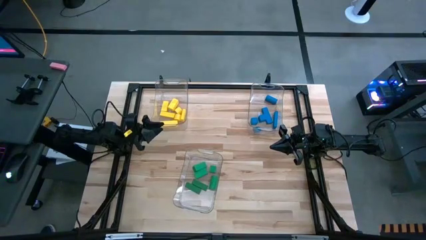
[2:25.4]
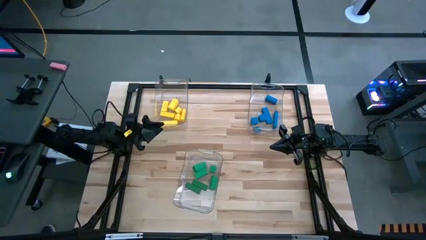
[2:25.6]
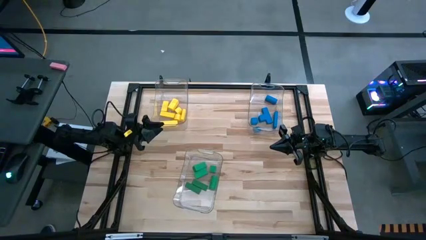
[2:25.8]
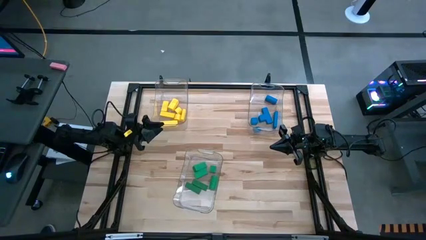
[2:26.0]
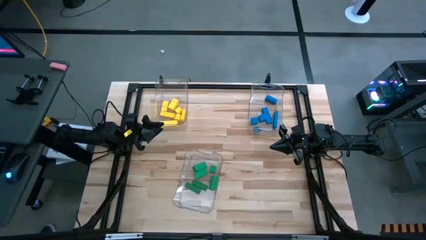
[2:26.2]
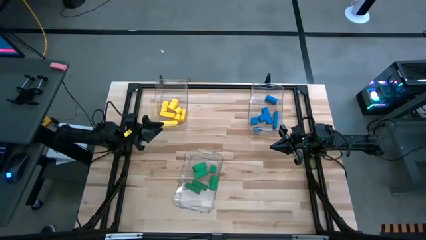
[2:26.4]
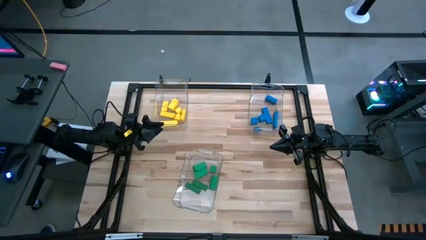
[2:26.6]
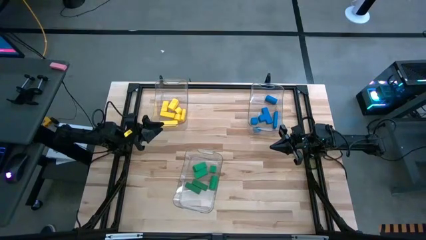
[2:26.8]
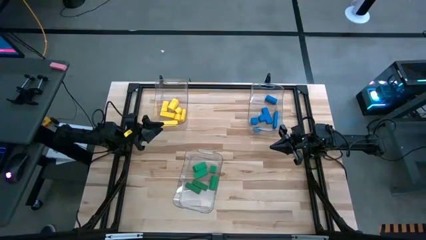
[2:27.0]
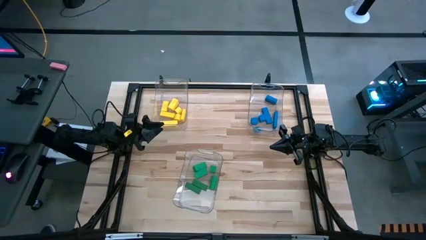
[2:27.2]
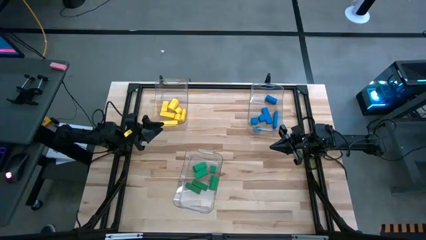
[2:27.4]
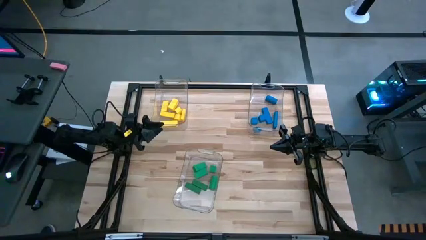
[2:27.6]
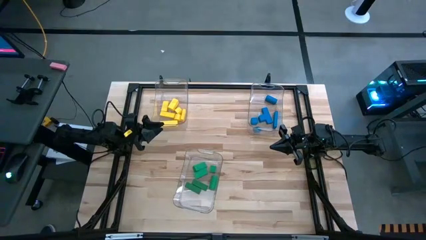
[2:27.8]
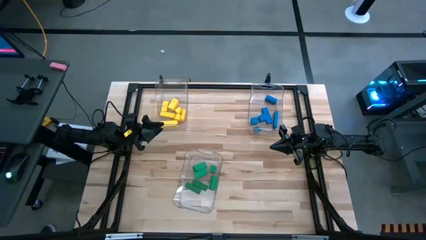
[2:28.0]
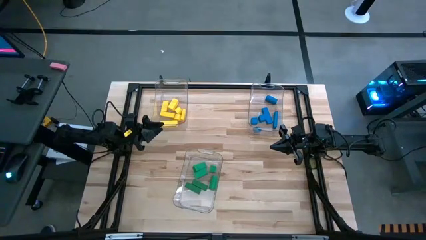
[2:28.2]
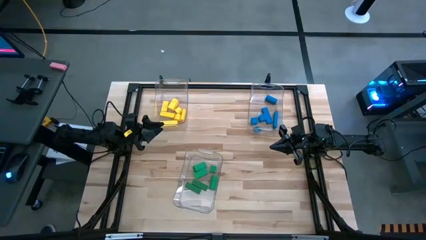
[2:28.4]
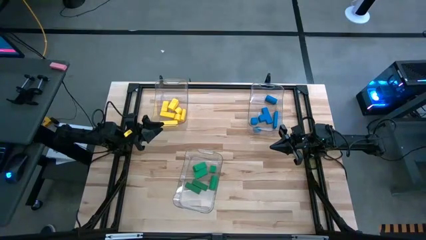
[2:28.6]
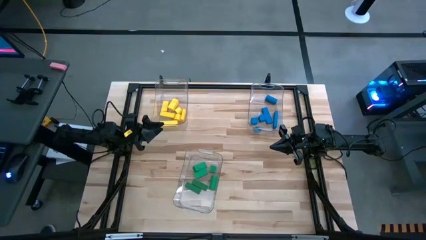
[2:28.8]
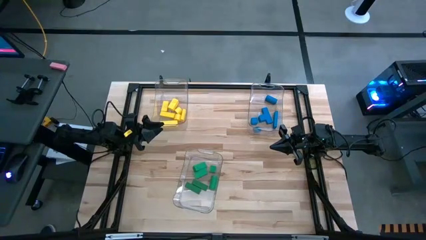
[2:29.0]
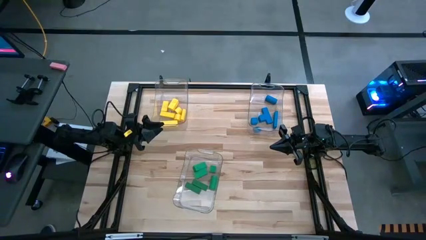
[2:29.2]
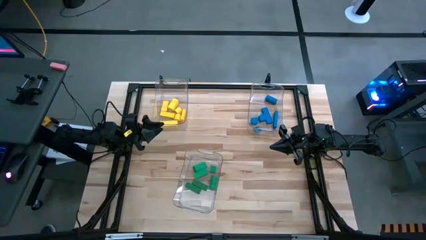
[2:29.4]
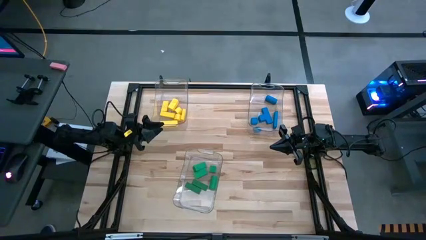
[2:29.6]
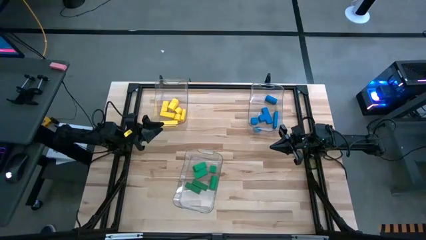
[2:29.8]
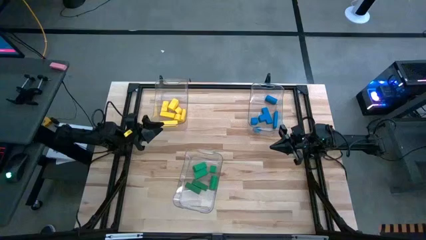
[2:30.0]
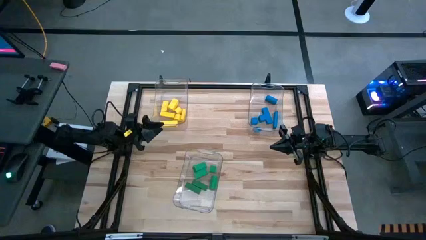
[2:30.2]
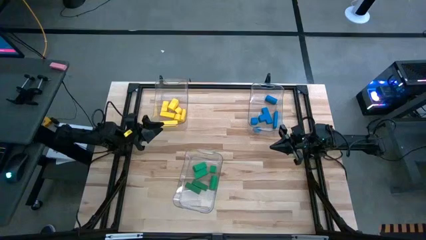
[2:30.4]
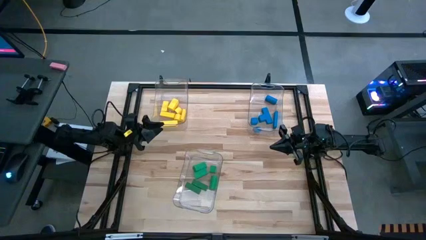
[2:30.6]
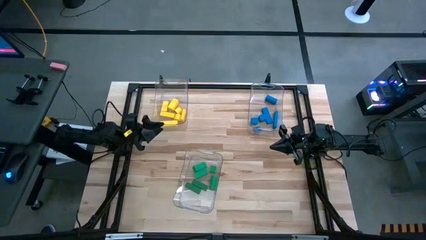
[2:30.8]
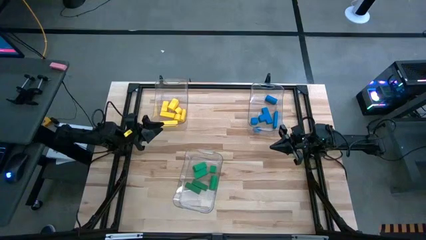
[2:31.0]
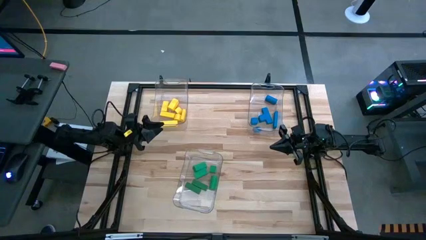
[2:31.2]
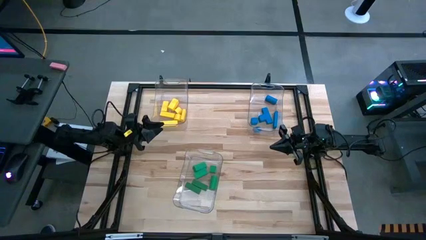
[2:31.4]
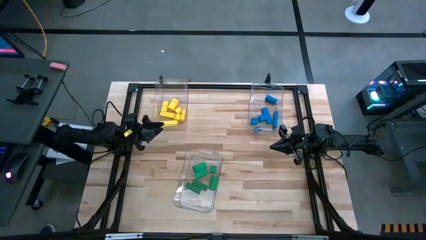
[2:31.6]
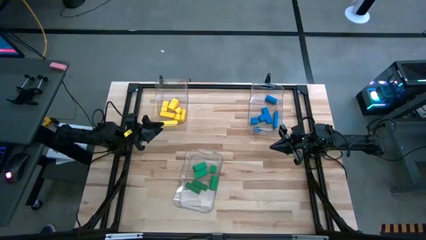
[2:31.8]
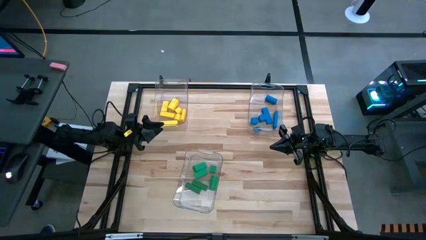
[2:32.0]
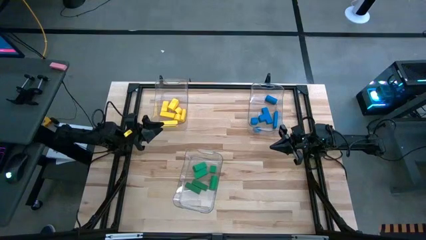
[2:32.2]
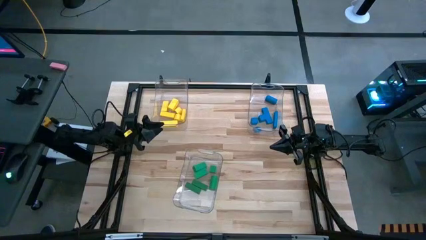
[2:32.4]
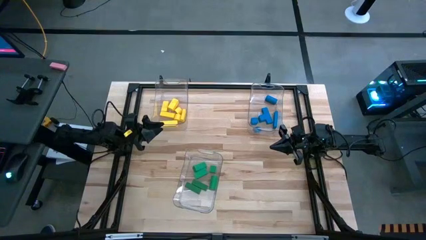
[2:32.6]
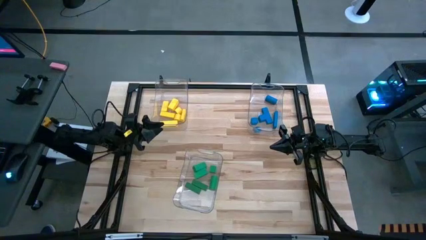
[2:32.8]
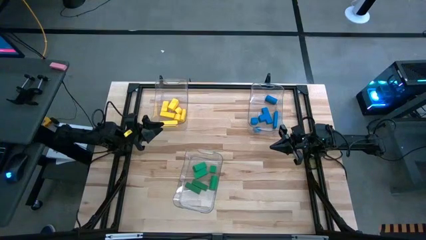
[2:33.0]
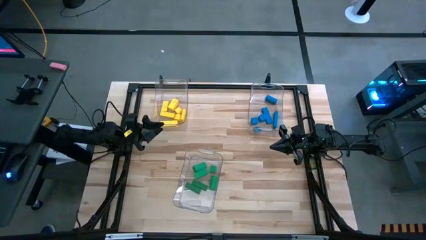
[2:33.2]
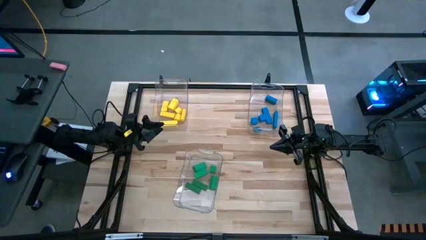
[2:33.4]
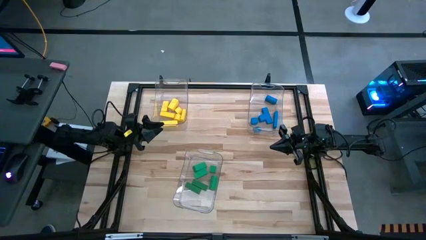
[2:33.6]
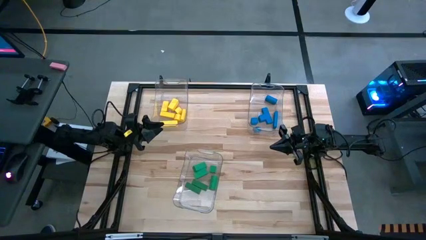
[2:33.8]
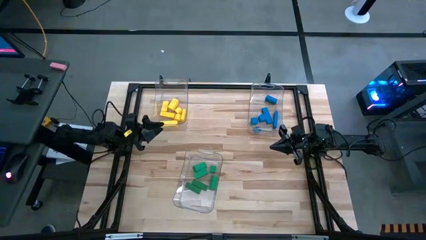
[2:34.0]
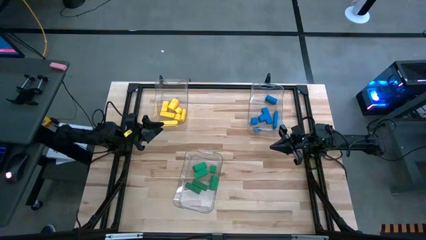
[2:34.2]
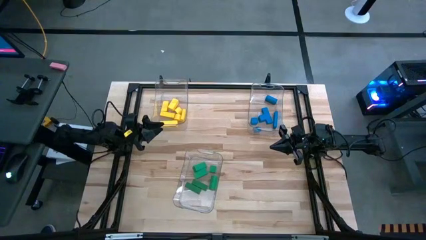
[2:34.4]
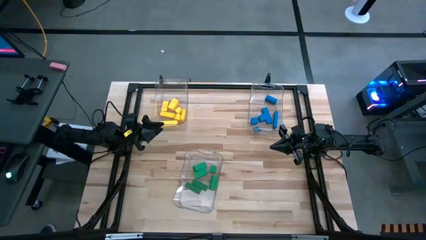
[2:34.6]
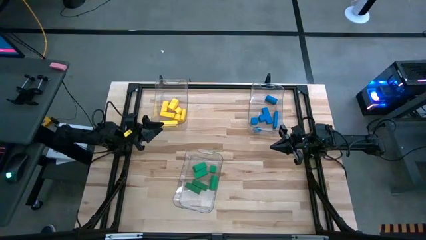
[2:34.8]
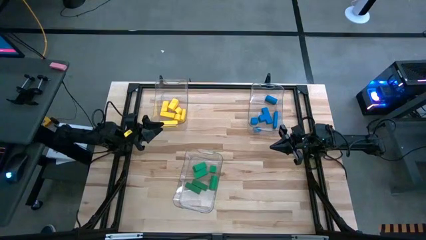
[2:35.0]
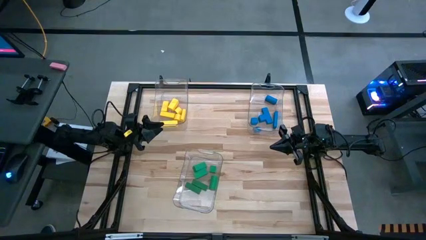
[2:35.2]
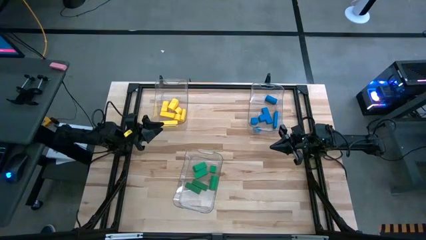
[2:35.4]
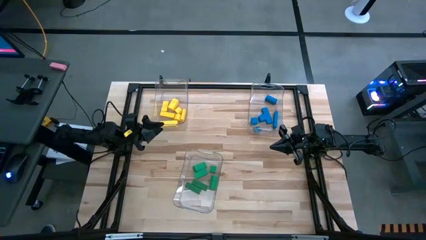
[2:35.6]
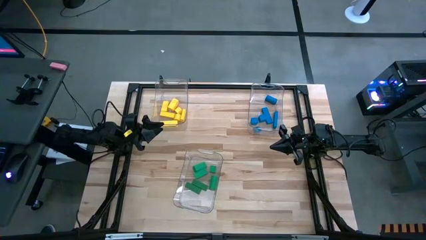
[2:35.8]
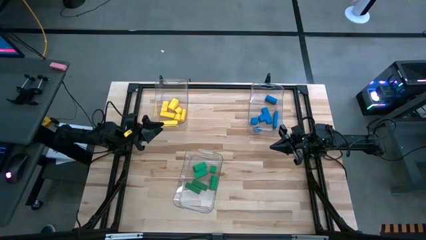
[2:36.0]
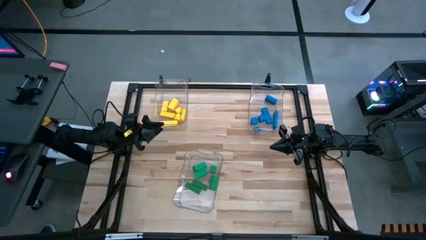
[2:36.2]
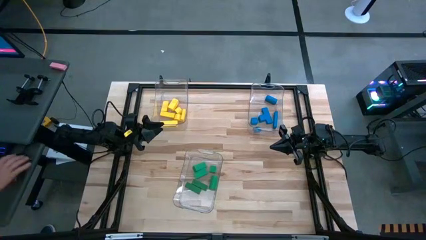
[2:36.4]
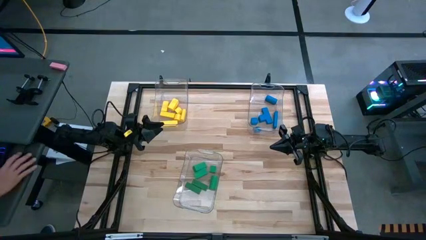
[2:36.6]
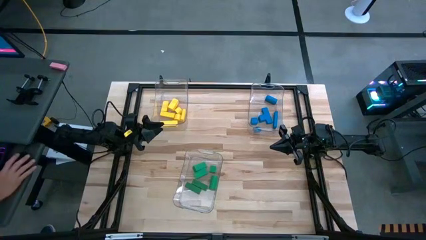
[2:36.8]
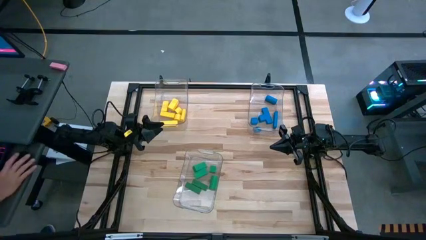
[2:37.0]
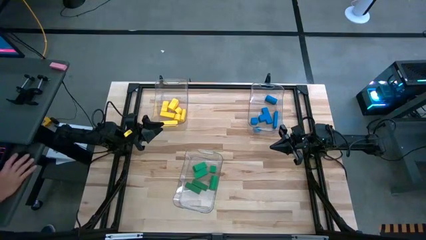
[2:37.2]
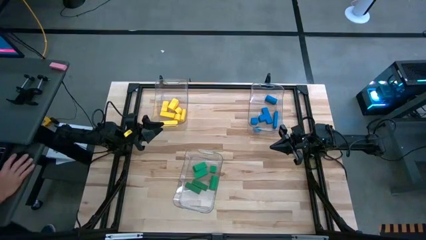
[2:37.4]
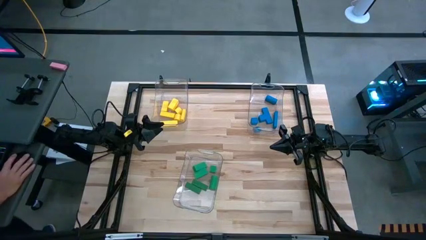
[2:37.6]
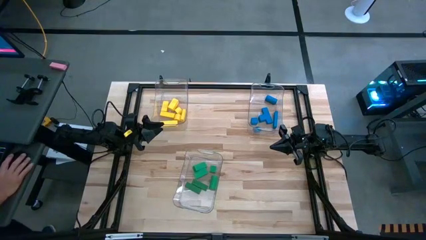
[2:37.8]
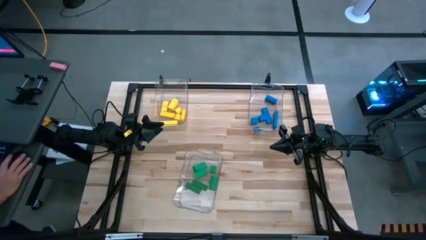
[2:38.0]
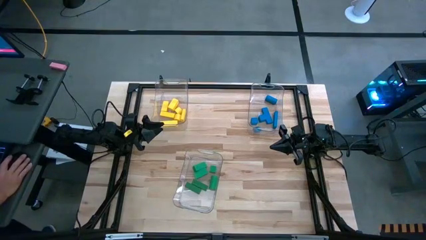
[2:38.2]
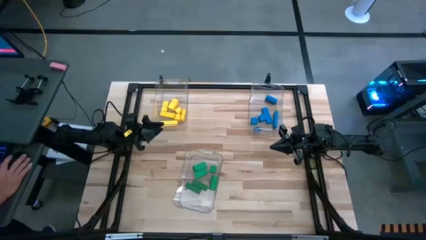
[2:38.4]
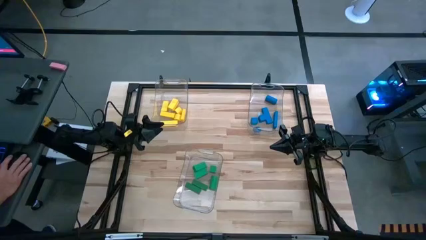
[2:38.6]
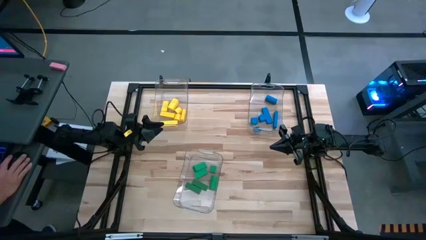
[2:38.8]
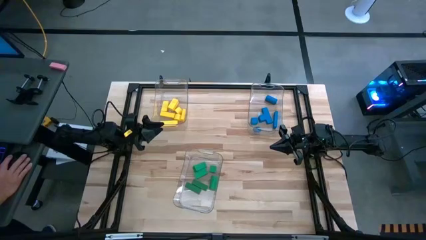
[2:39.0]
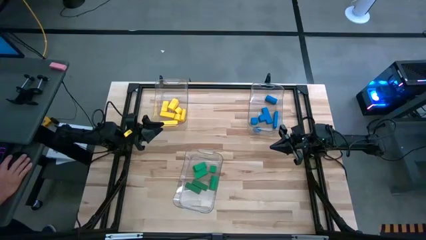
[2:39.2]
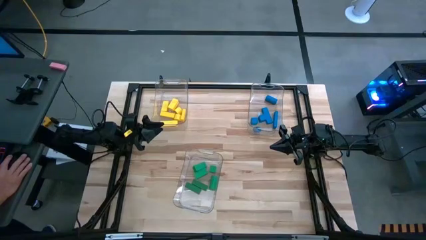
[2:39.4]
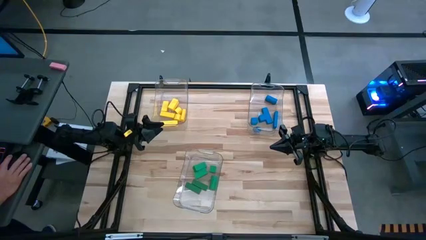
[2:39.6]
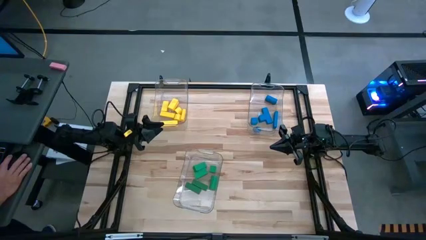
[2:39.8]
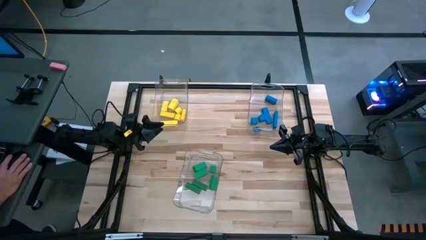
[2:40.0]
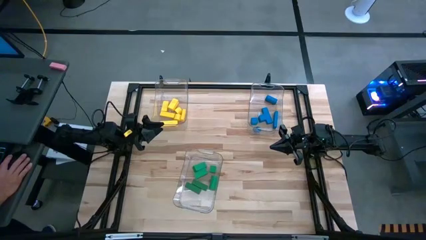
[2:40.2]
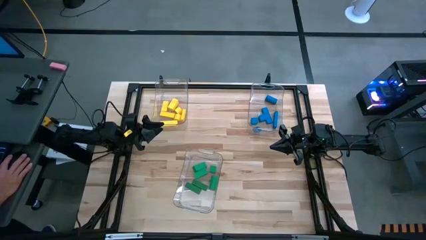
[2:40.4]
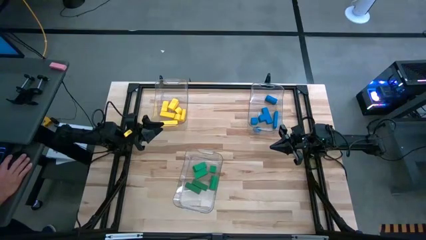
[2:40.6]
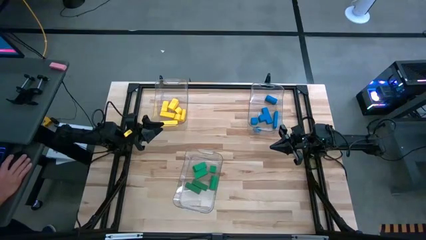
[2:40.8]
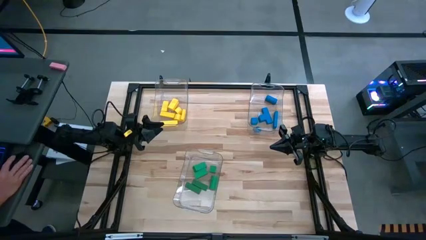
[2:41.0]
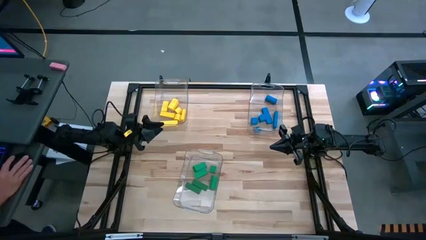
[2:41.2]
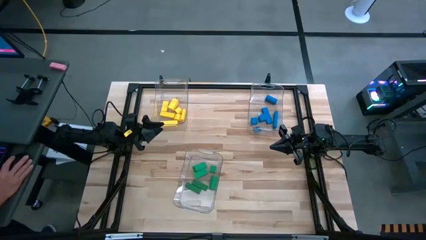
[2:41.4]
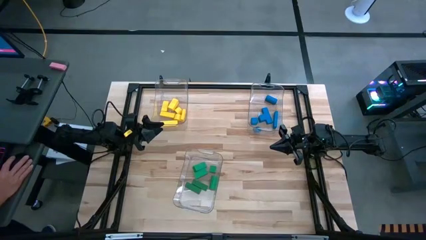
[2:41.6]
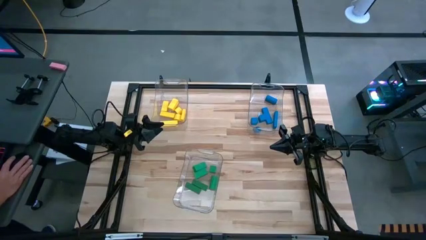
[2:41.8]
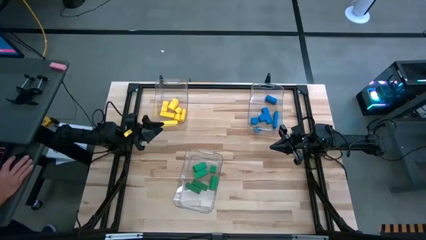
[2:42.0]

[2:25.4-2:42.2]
Task: Sort blocks
Return to Home Position
